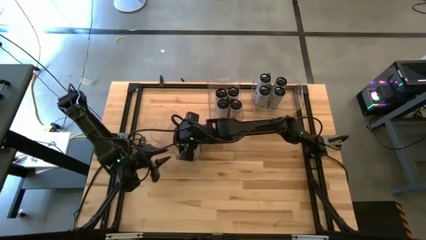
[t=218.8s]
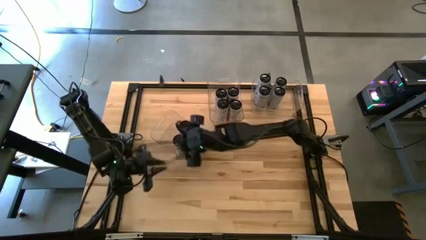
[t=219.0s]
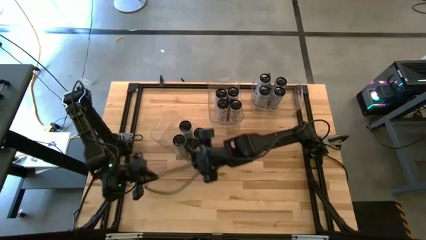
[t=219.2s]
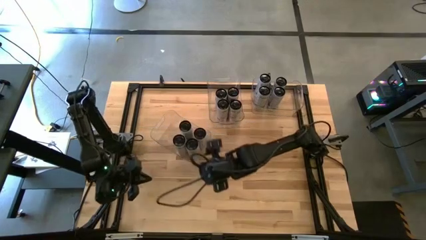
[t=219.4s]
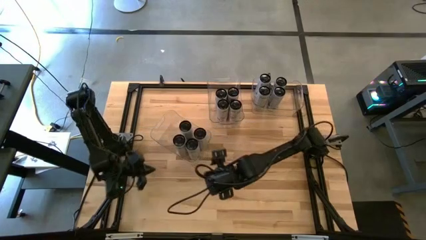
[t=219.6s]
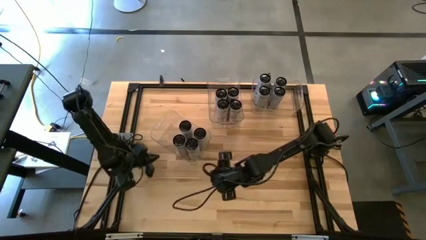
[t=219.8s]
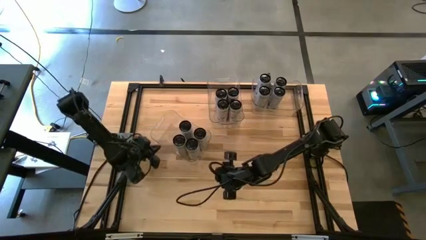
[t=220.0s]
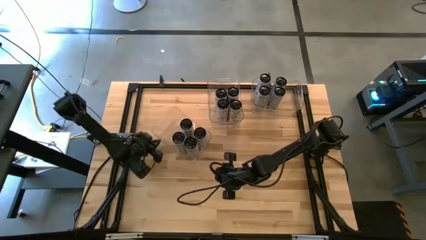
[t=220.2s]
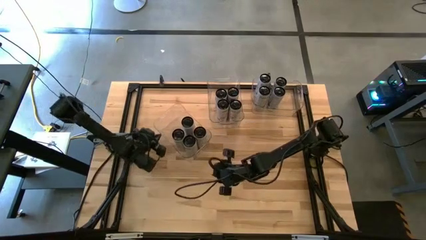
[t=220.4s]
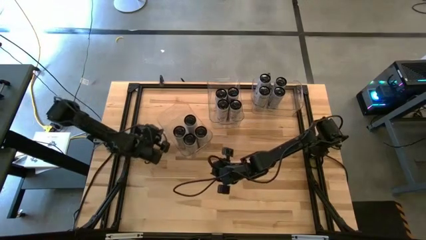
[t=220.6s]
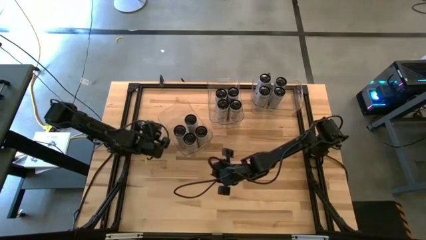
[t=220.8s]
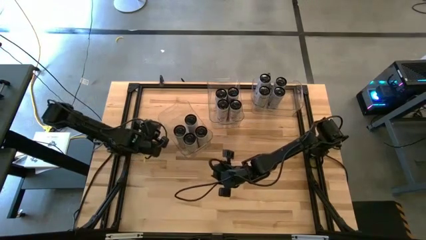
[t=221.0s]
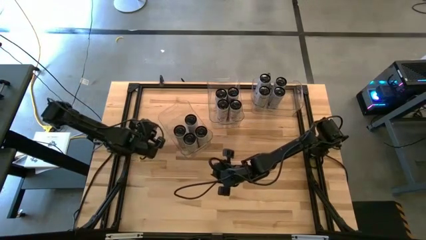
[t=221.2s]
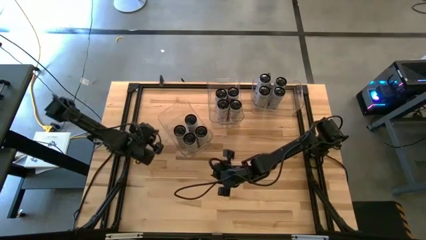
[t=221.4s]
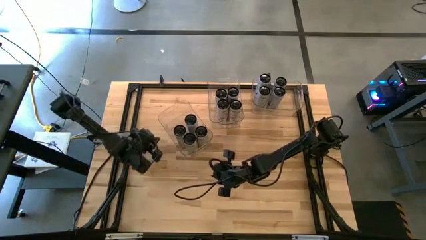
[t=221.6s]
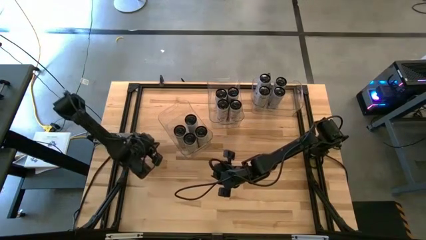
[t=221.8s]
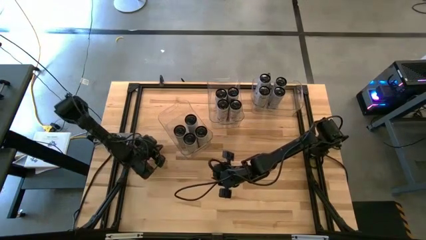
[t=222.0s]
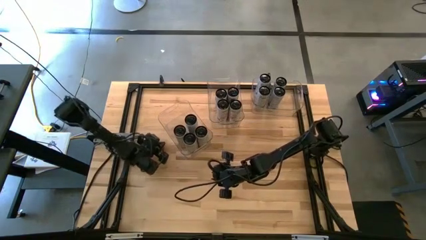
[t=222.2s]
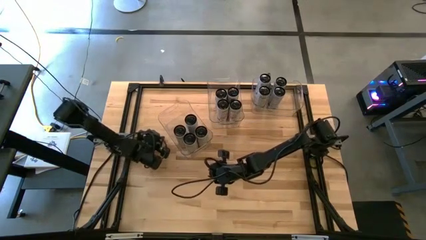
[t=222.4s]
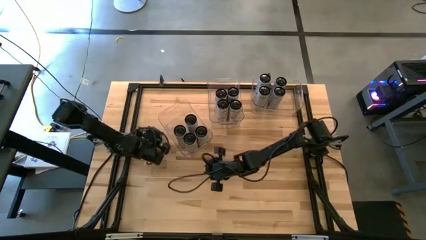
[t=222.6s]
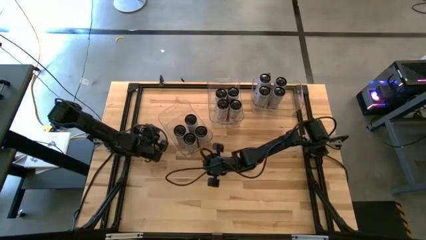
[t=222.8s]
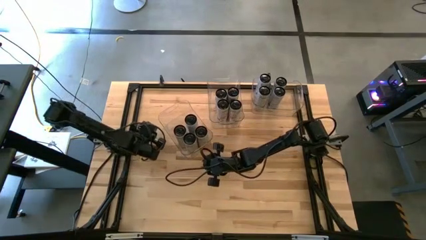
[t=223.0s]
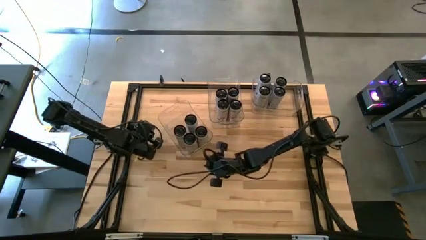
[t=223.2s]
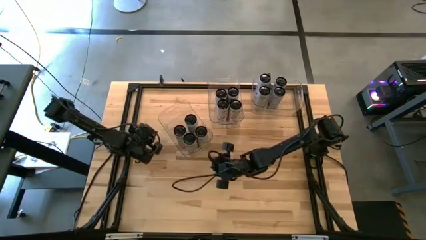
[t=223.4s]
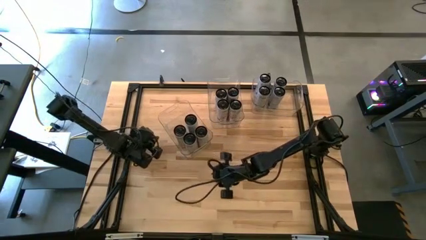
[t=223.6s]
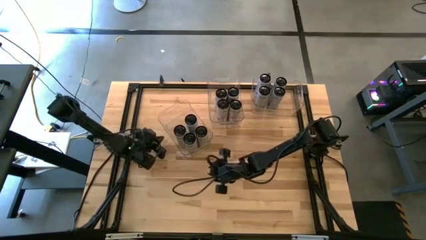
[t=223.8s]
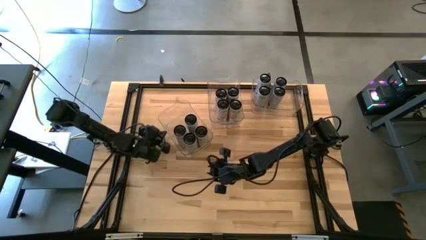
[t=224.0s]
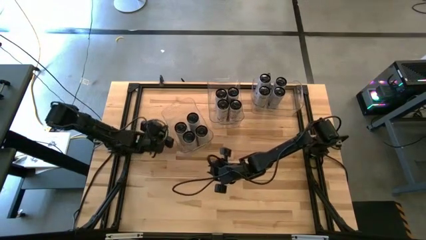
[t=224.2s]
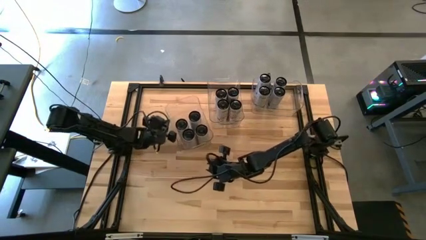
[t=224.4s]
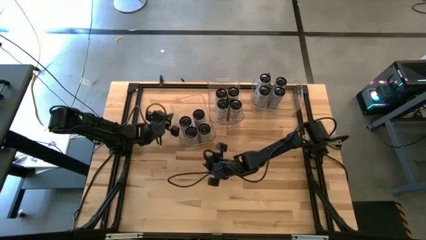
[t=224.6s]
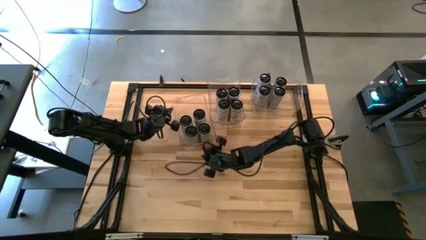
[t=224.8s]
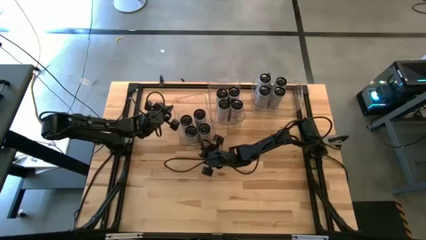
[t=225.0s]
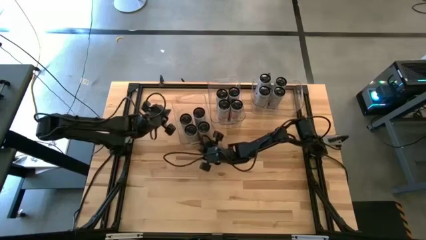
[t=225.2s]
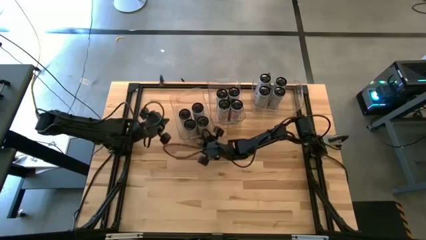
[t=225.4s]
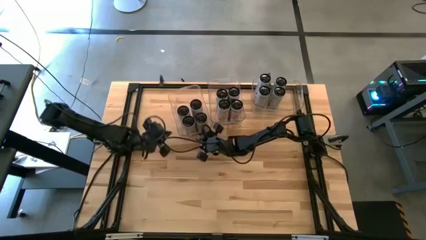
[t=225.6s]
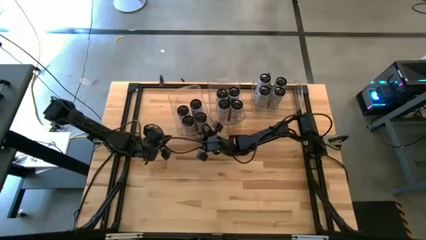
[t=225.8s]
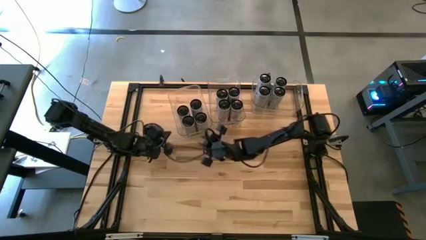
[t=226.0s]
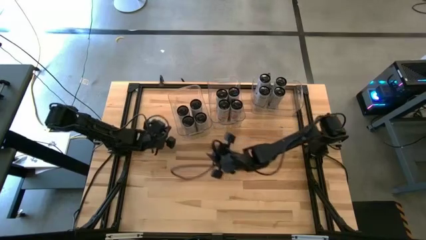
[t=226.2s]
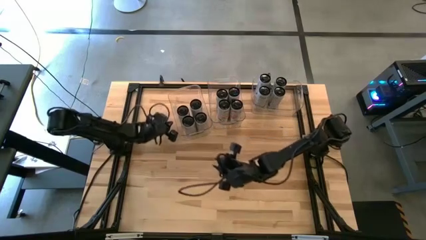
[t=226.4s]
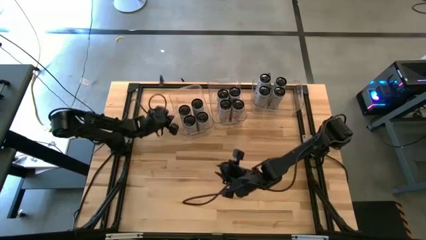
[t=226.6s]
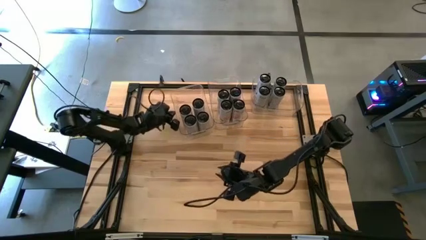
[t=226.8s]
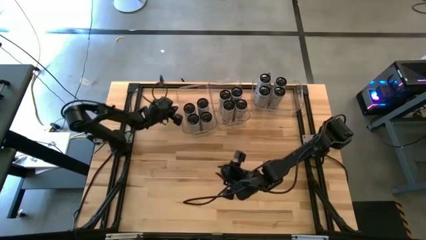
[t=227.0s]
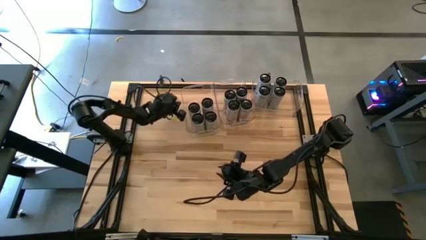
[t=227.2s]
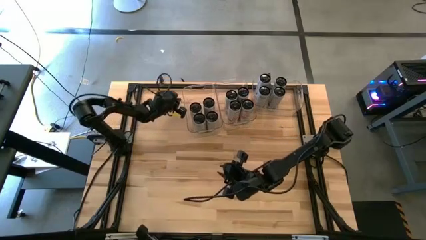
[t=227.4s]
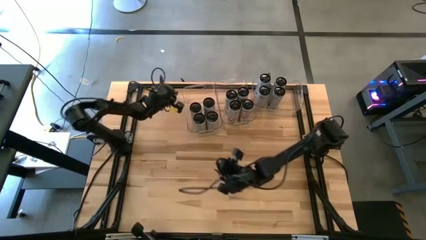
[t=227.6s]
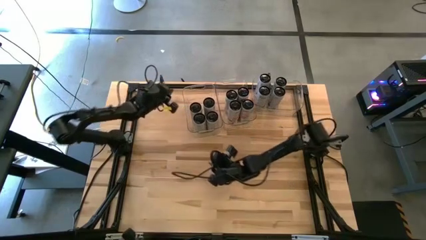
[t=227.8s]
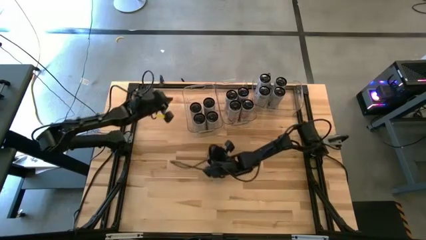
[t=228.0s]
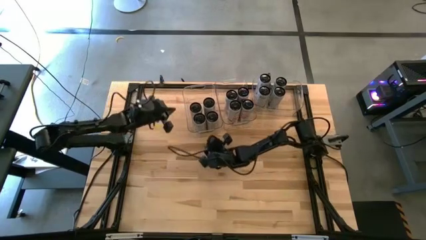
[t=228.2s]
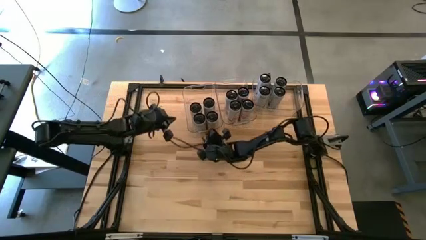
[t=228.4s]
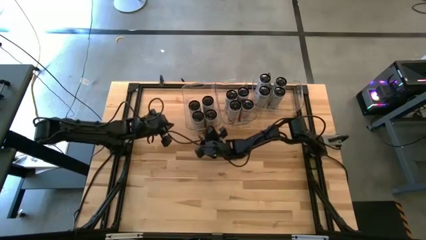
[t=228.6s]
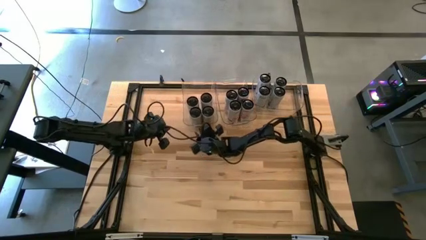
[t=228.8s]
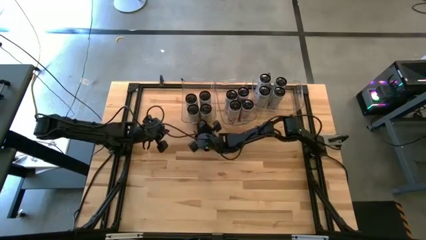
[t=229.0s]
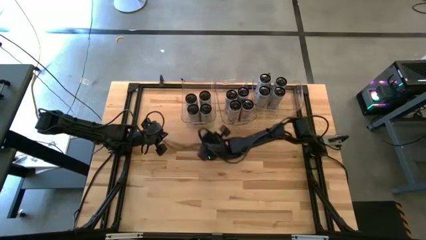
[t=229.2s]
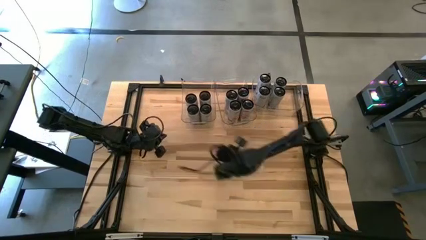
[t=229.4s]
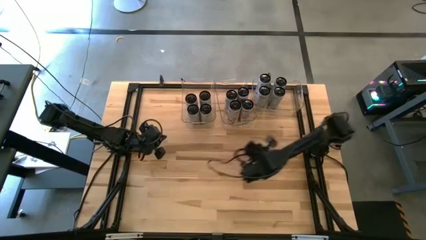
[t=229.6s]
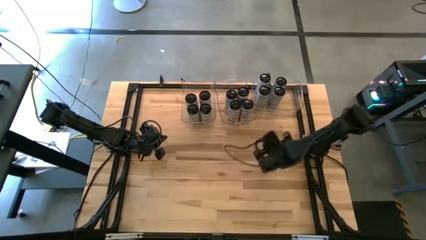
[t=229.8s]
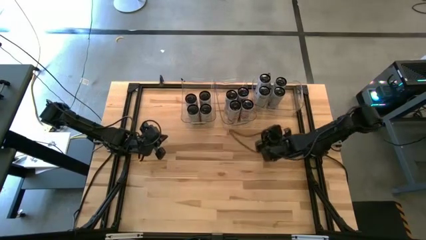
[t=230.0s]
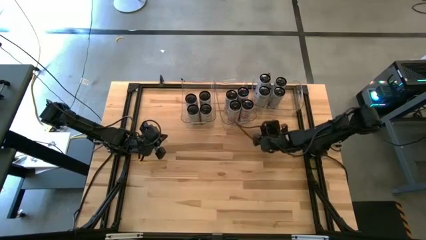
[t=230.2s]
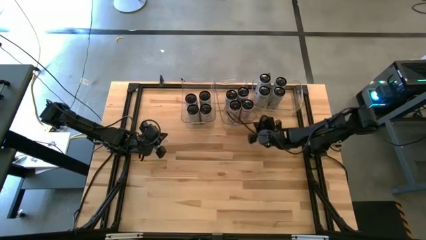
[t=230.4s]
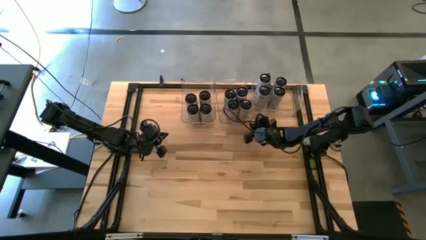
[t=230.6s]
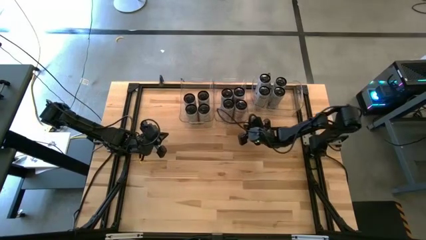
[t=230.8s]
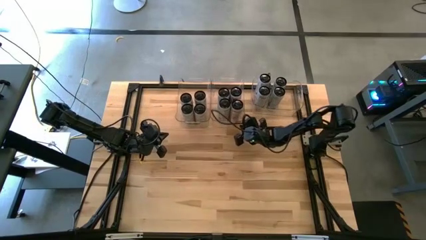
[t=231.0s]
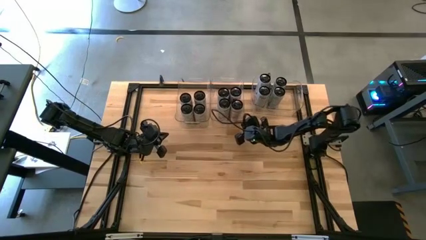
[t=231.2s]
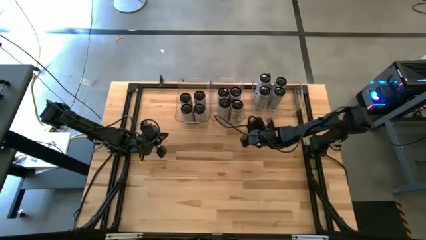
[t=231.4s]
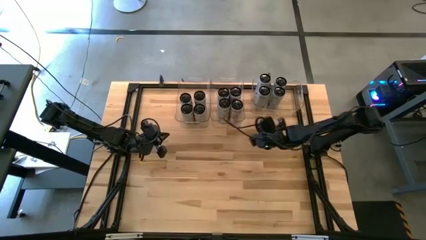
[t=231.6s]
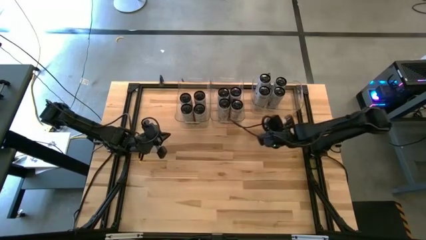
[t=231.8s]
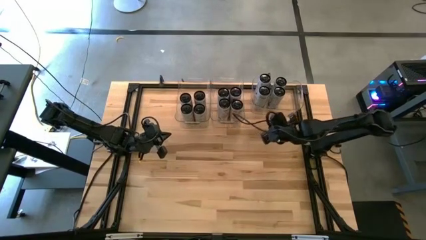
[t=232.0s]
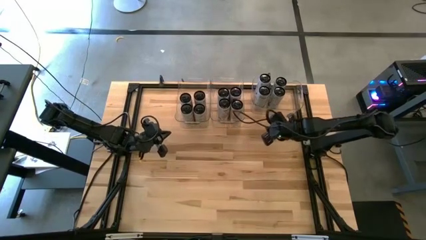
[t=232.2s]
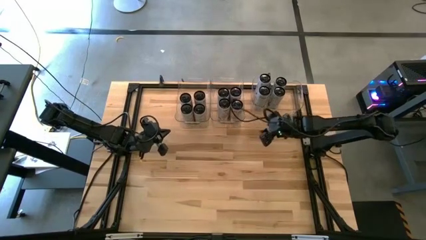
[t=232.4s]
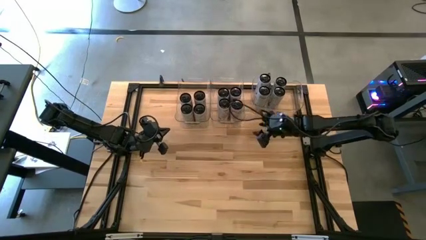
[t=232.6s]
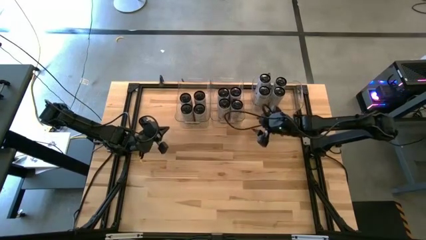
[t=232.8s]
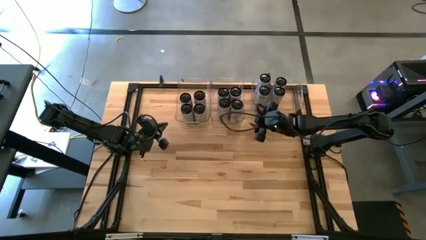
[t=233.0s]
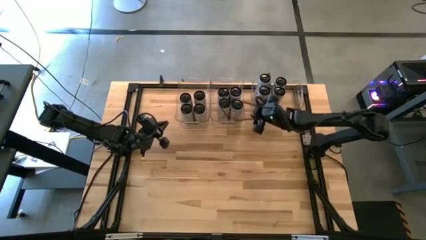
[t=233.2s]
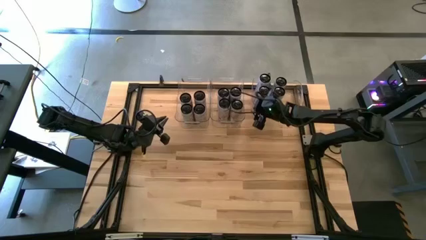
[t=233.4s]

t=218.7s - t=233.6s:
Task: Sort soda cans
Adjust all the transparent bins to the top of the table
